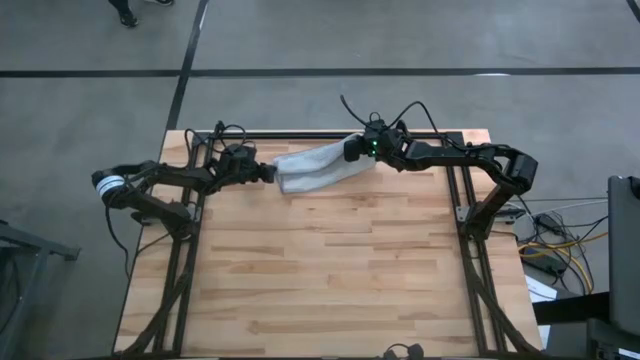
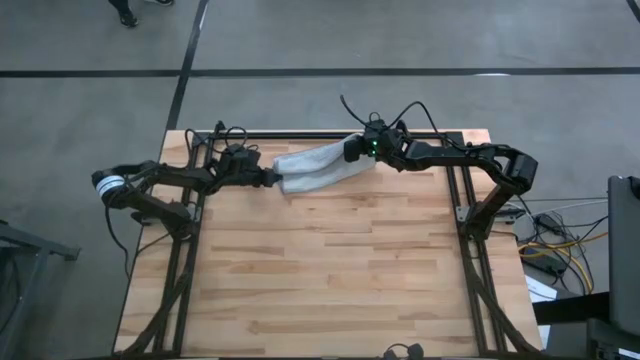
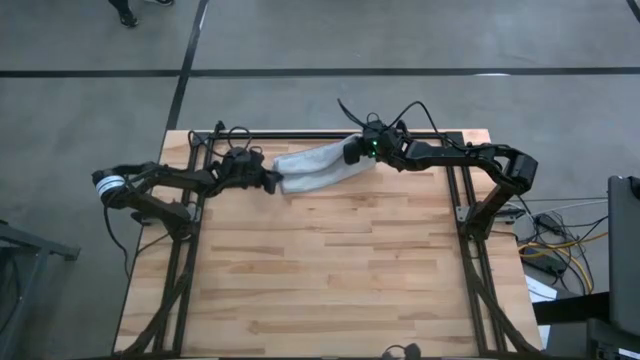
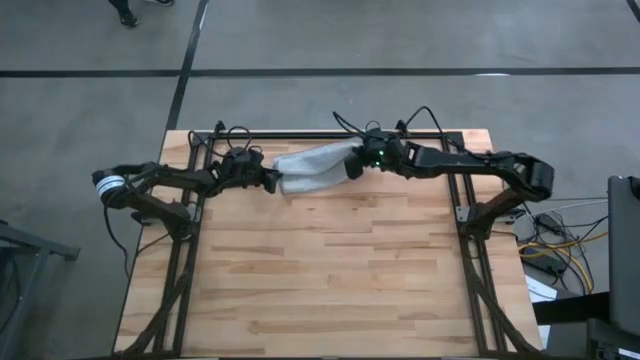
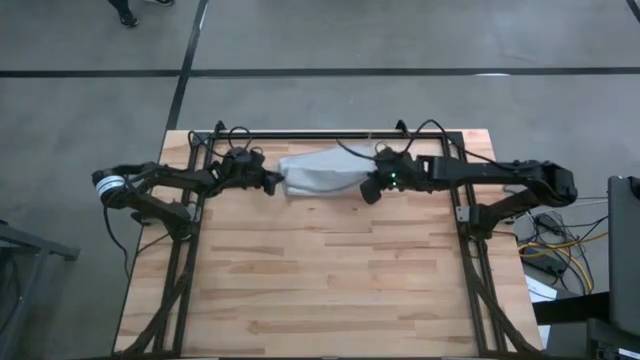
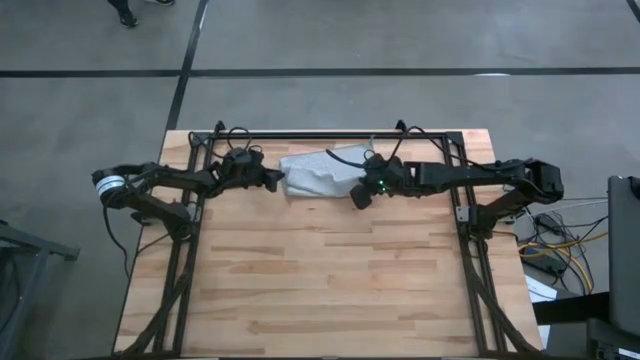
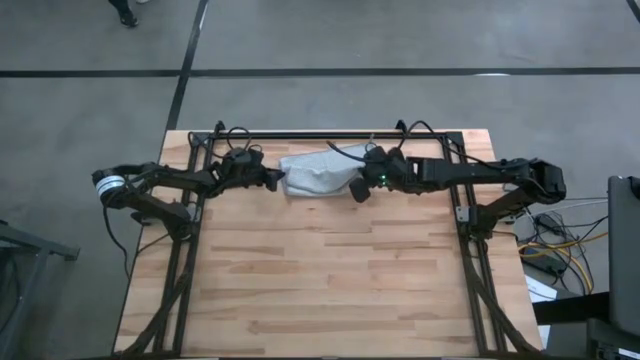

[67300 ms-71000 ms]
Task: Roll towel
Fold the gray towel on the table

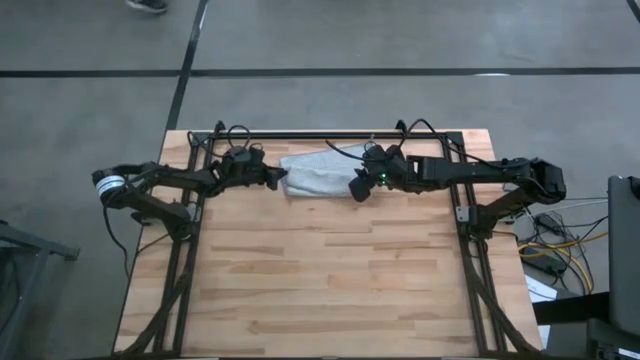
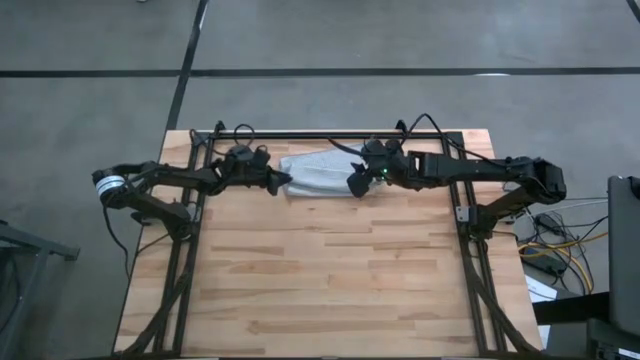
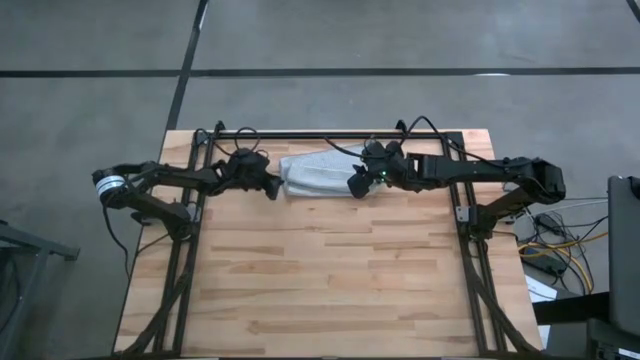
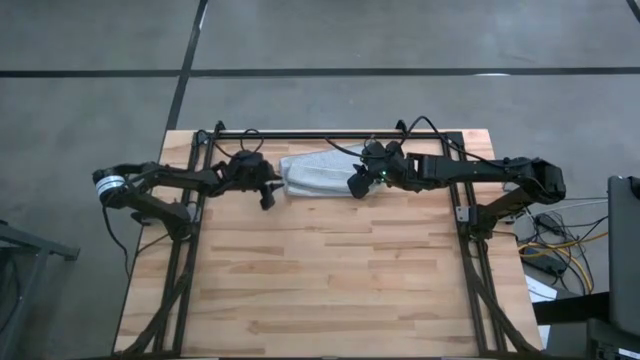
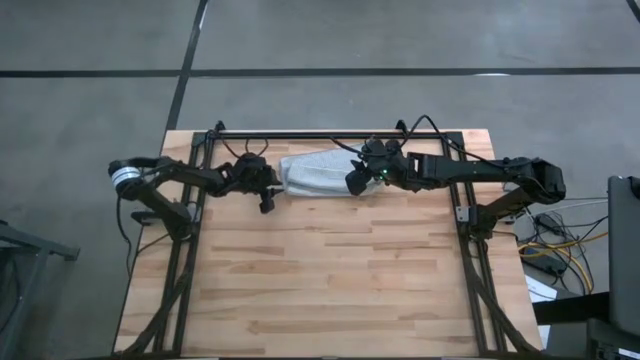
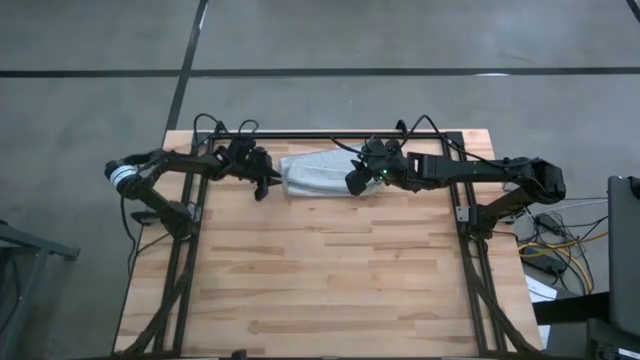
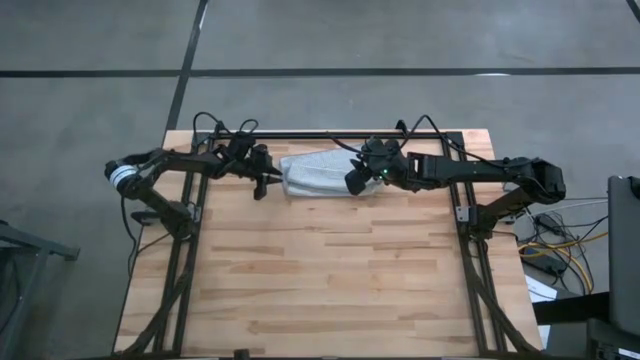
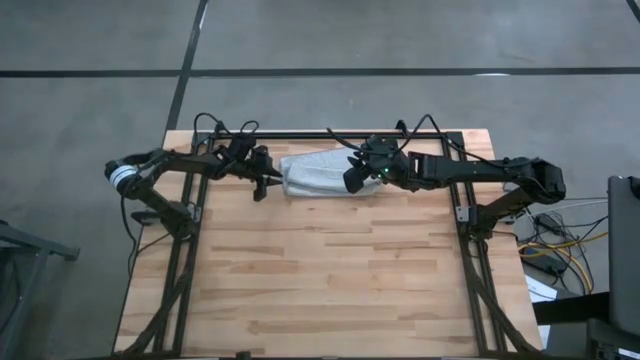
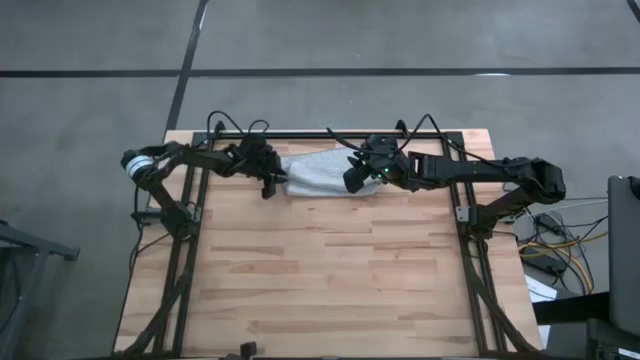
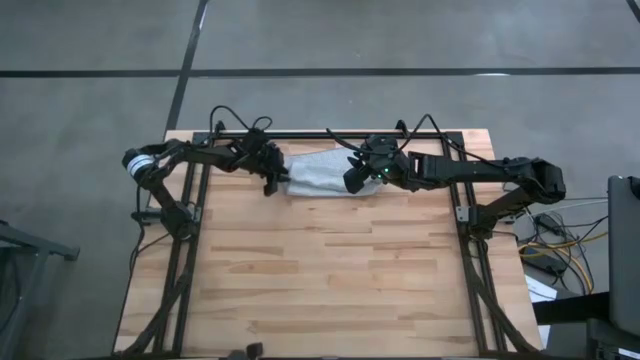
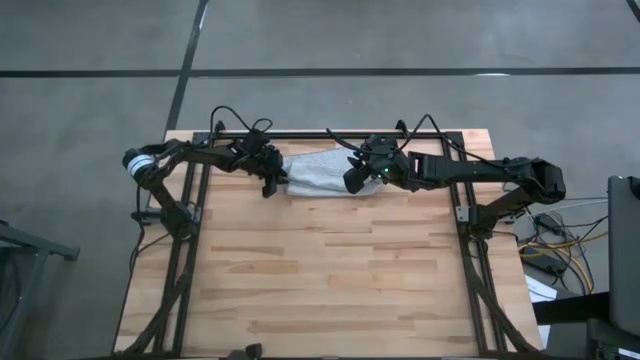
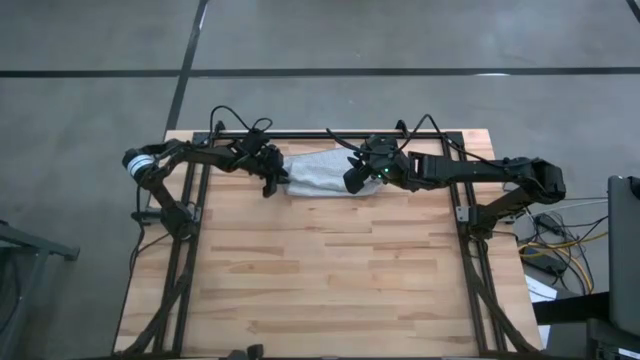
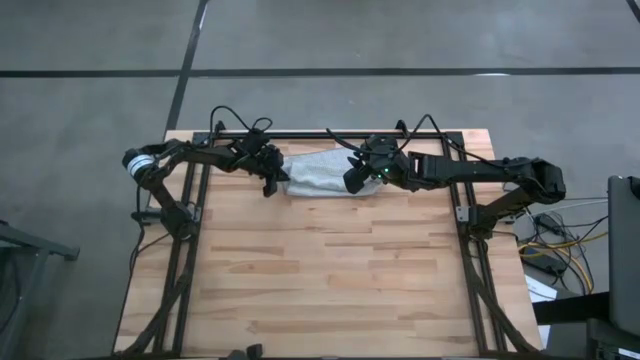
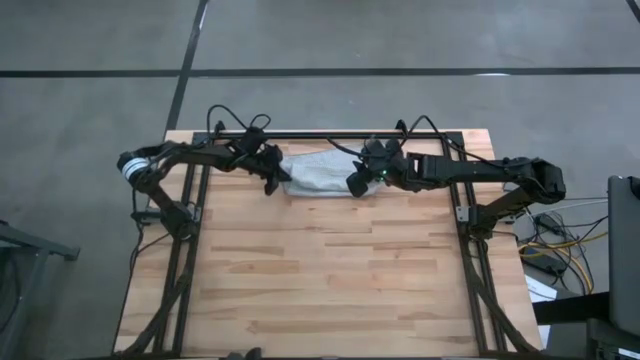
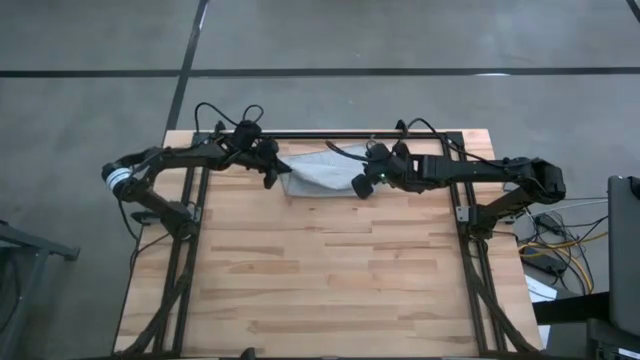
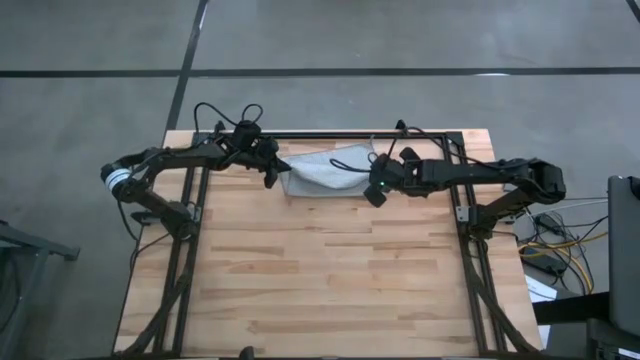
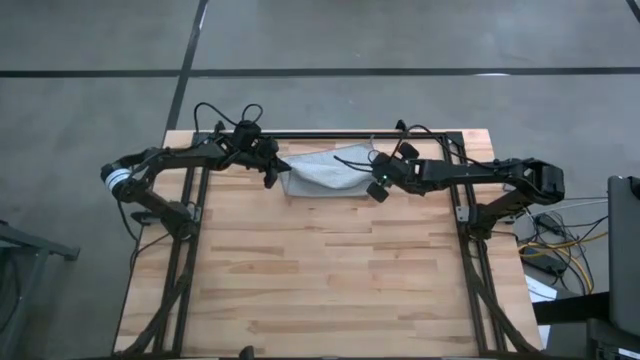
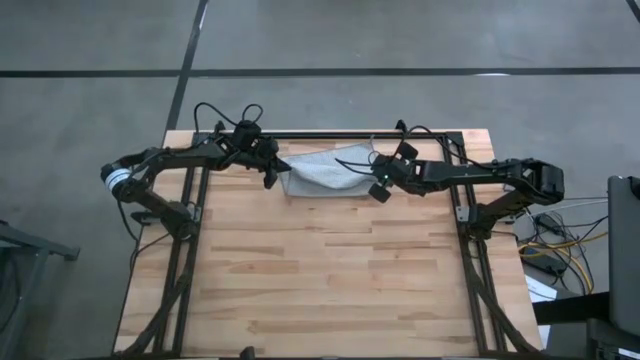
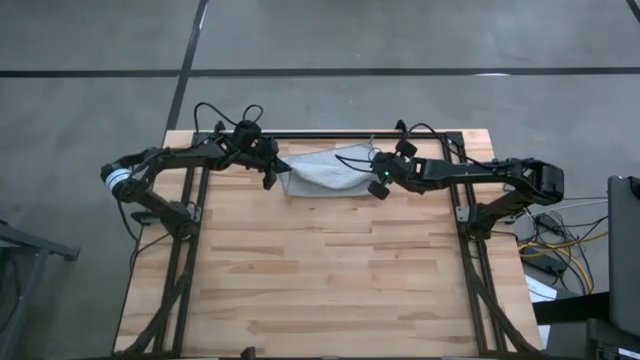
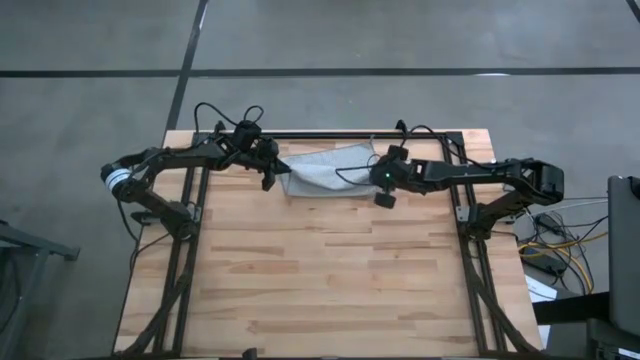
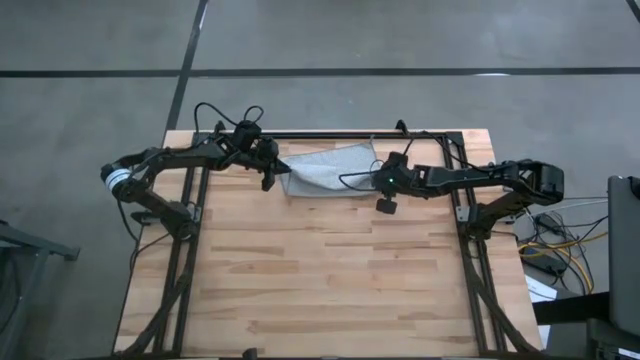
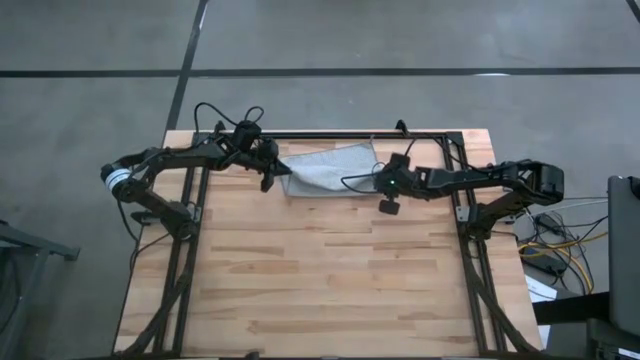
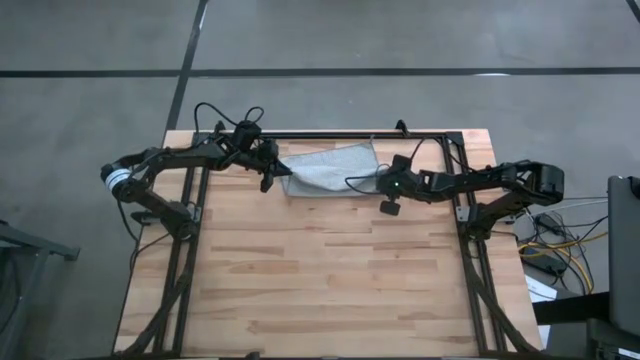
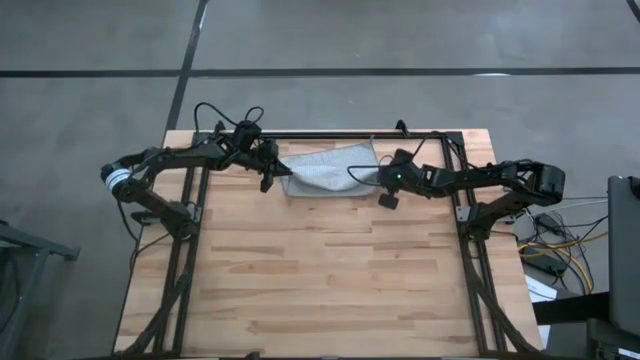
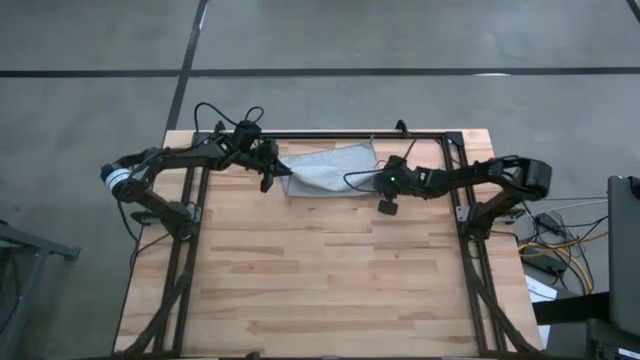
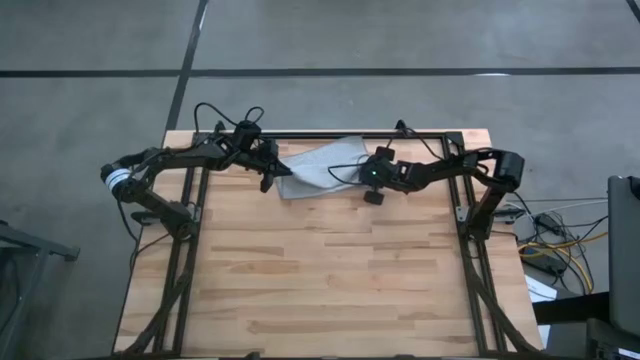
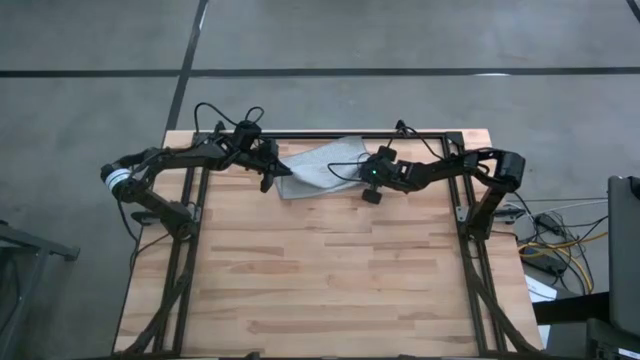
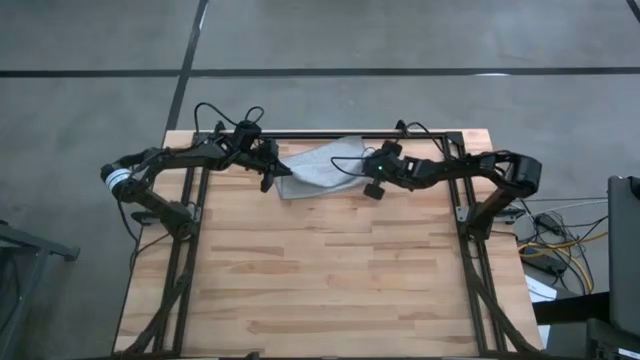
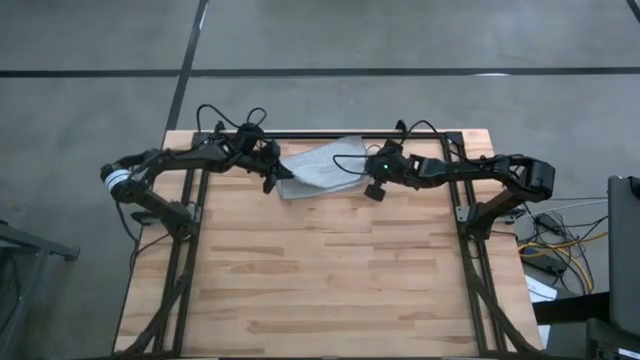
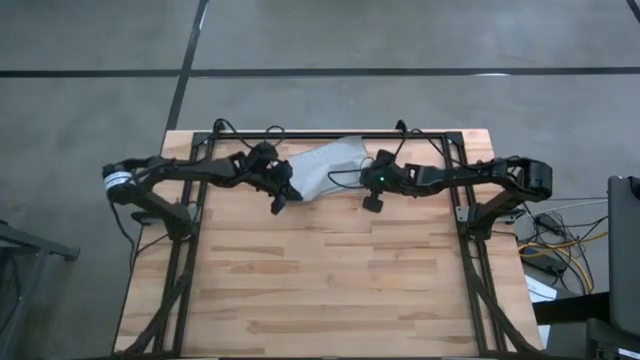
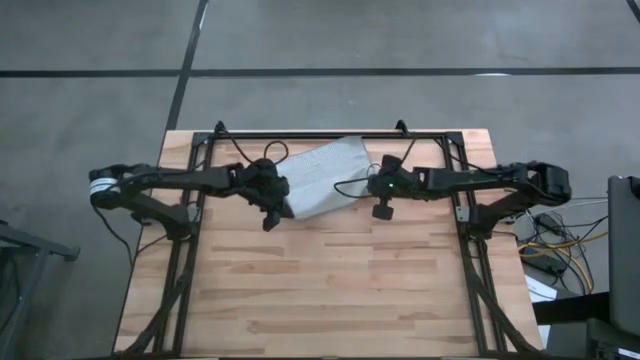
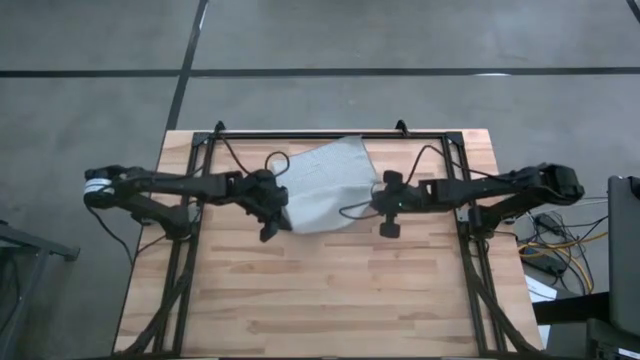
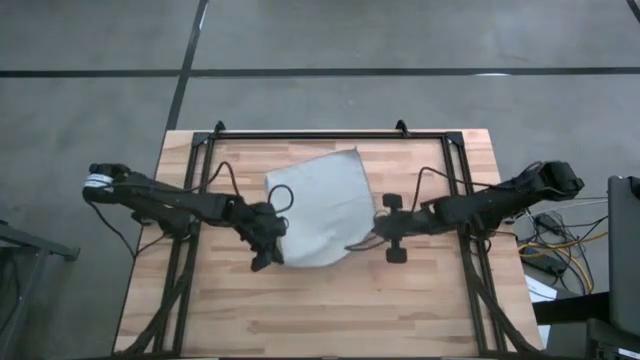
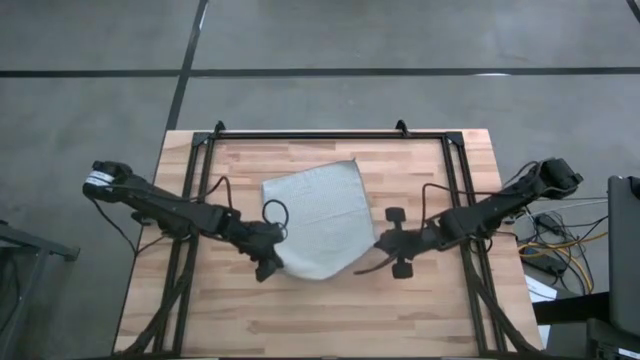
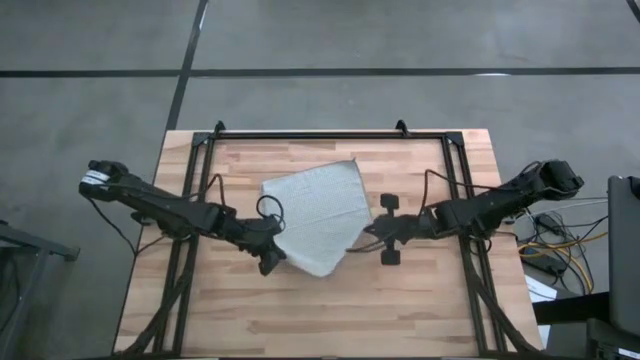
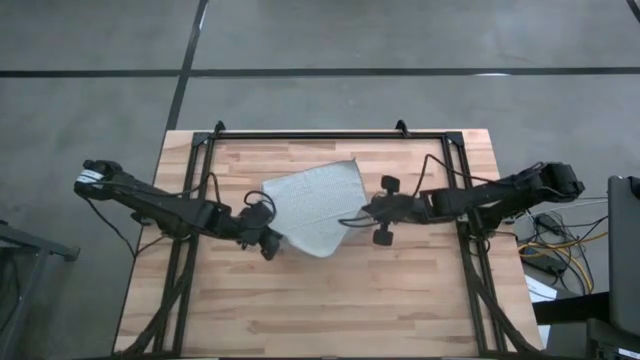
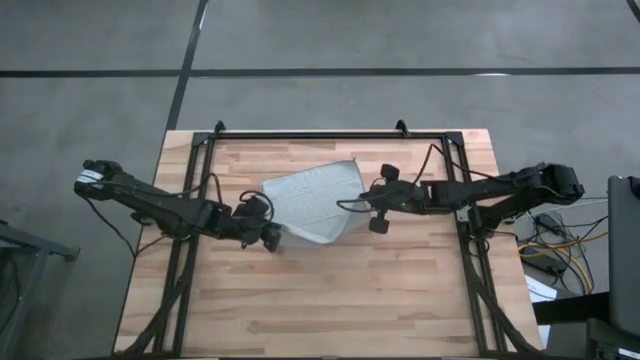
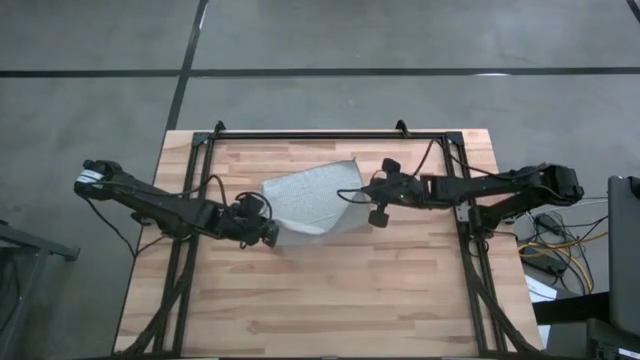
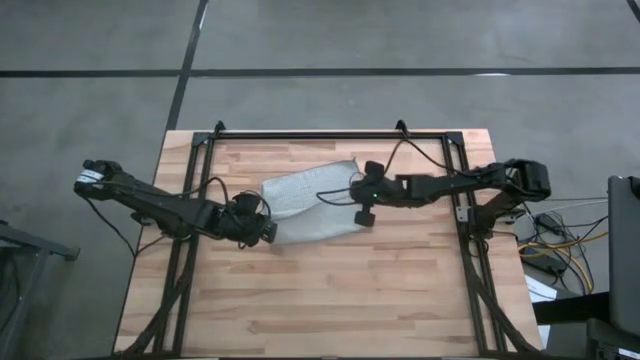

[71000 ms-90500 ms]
Fold the gray towel
